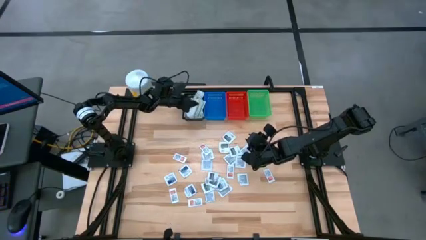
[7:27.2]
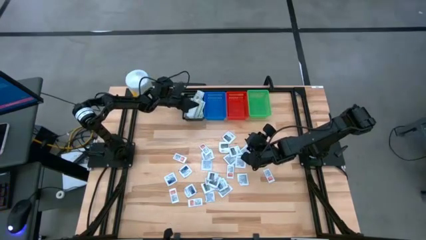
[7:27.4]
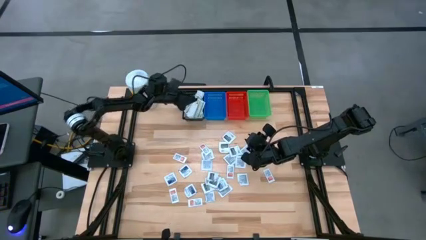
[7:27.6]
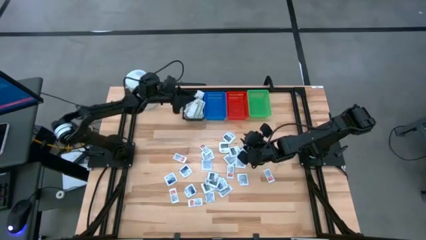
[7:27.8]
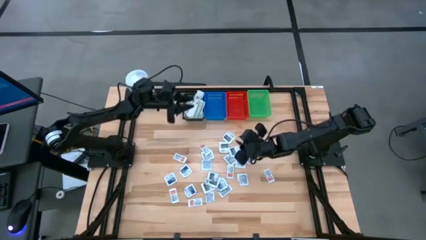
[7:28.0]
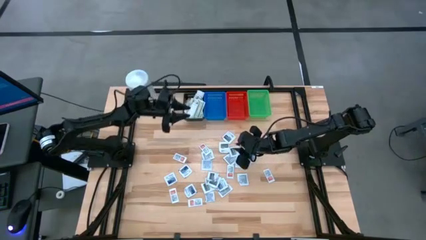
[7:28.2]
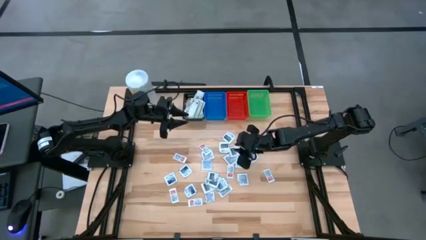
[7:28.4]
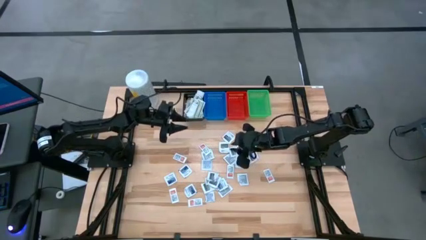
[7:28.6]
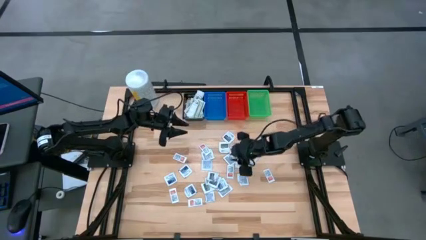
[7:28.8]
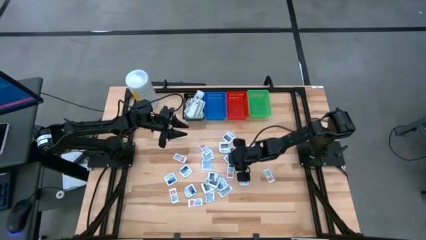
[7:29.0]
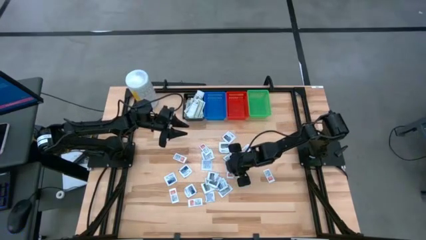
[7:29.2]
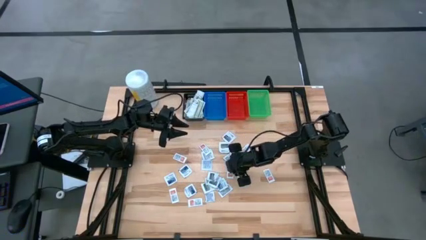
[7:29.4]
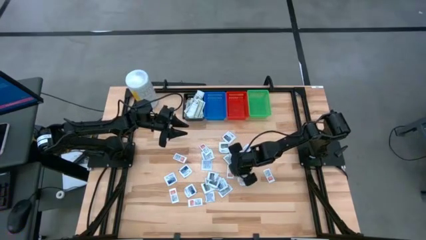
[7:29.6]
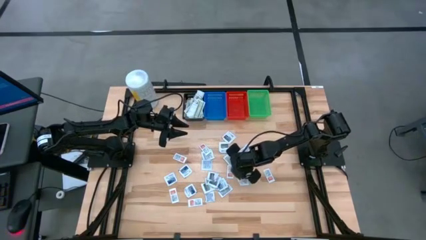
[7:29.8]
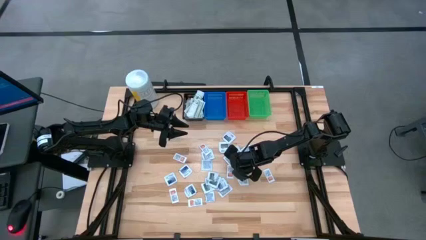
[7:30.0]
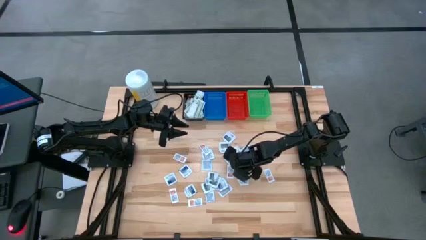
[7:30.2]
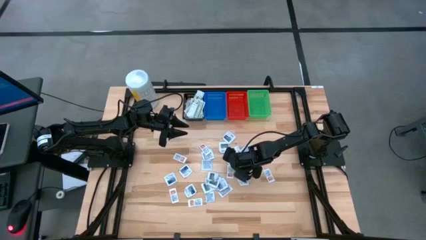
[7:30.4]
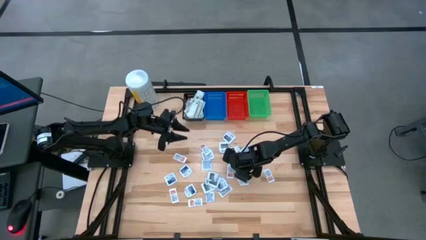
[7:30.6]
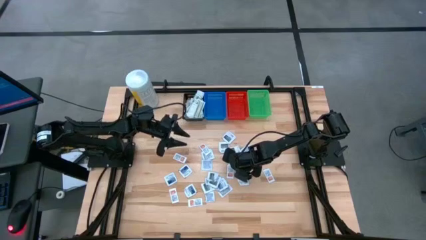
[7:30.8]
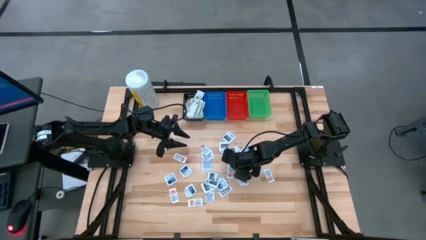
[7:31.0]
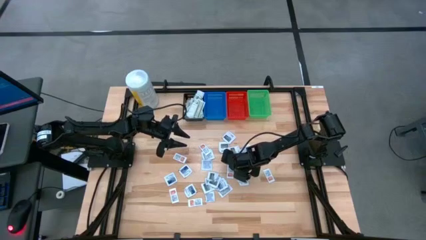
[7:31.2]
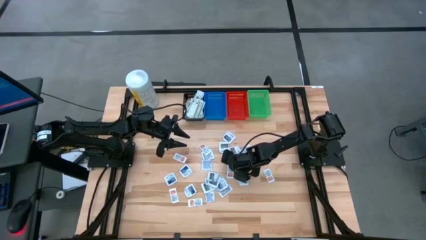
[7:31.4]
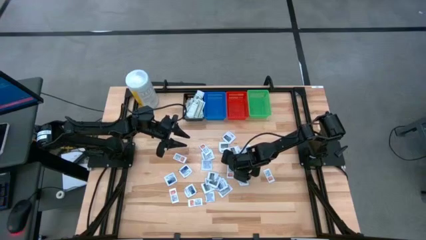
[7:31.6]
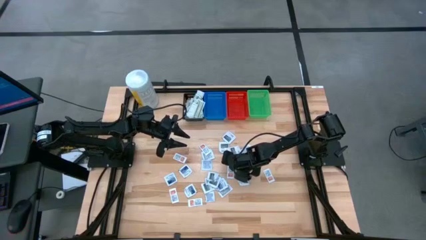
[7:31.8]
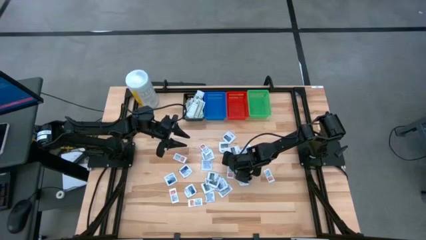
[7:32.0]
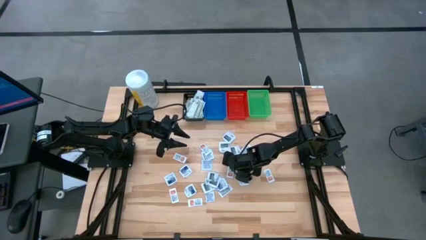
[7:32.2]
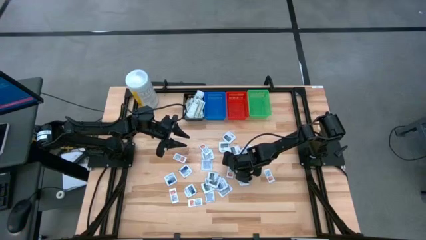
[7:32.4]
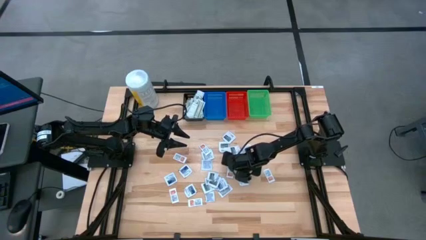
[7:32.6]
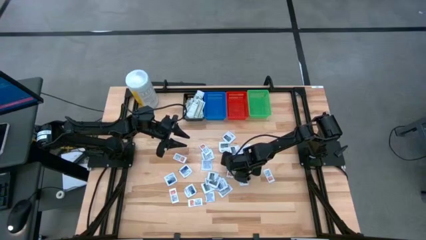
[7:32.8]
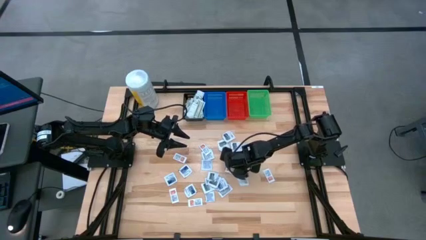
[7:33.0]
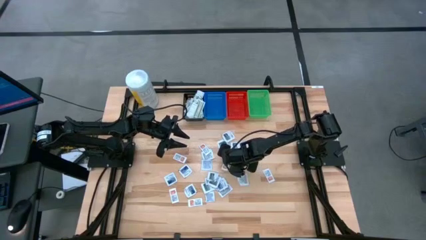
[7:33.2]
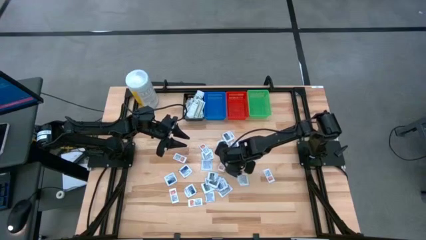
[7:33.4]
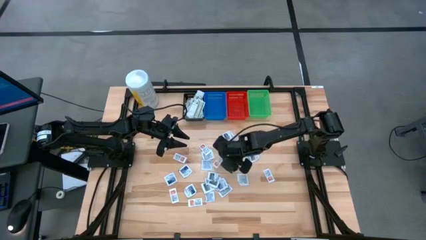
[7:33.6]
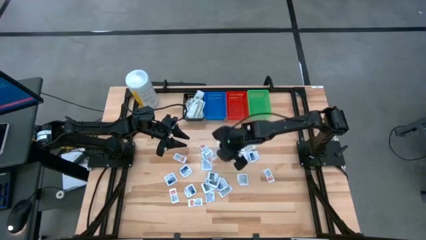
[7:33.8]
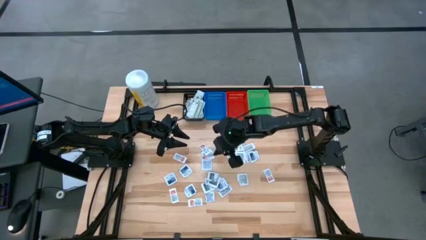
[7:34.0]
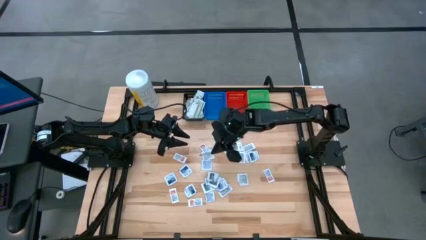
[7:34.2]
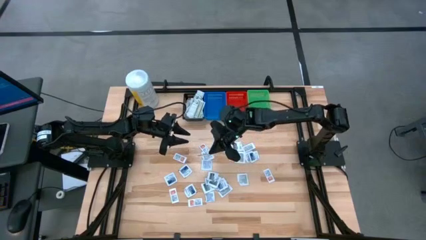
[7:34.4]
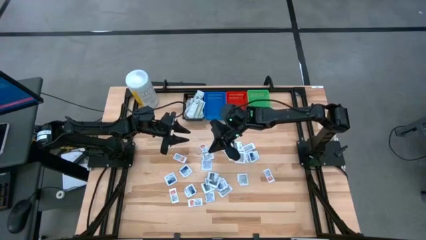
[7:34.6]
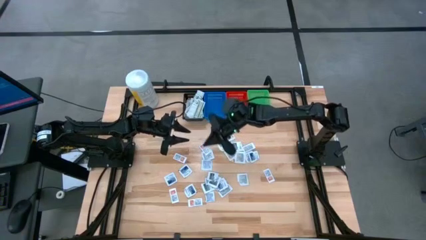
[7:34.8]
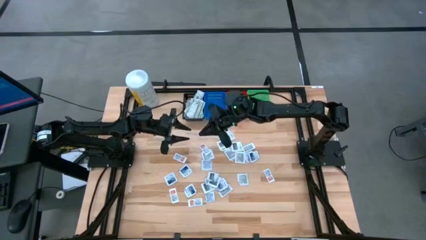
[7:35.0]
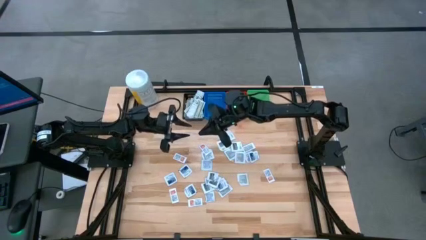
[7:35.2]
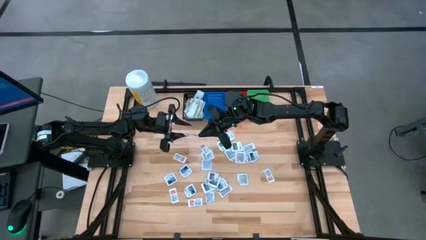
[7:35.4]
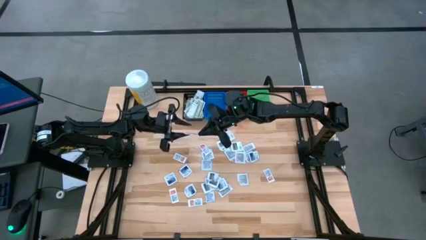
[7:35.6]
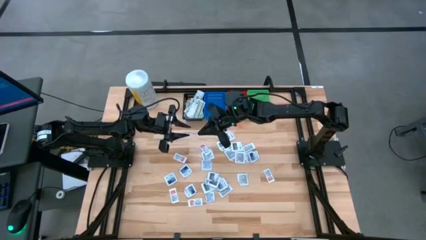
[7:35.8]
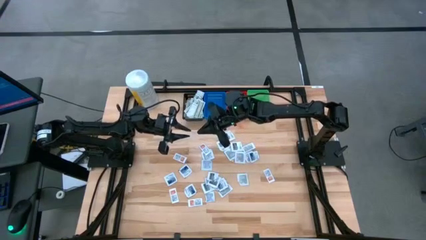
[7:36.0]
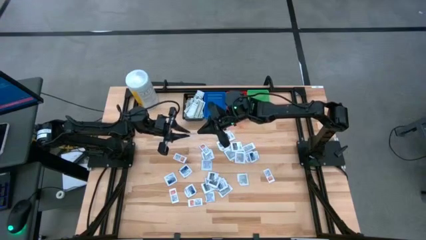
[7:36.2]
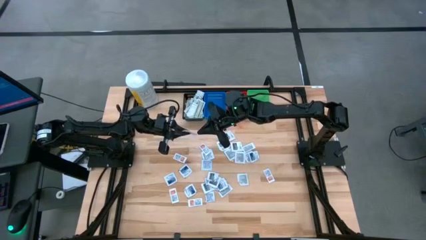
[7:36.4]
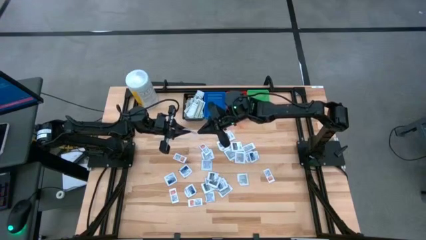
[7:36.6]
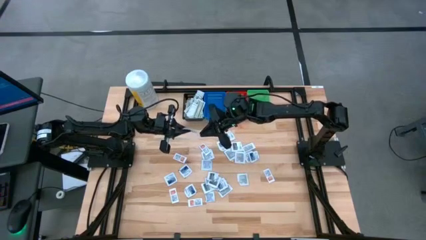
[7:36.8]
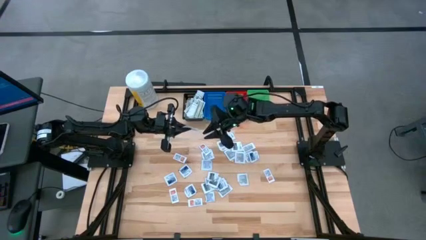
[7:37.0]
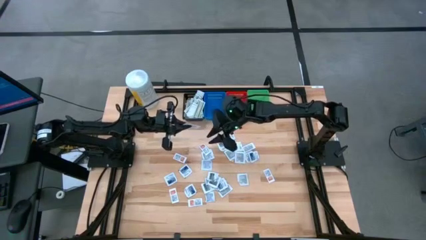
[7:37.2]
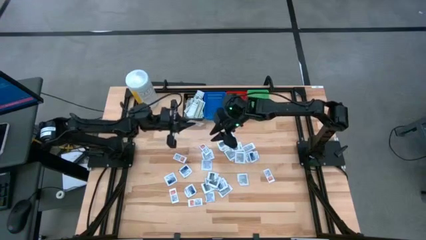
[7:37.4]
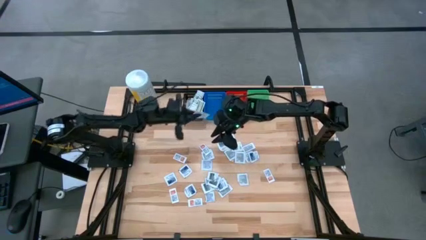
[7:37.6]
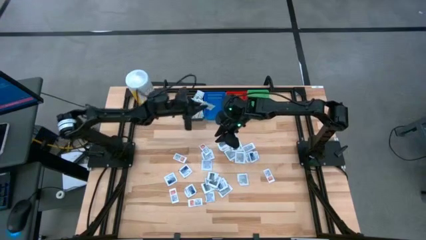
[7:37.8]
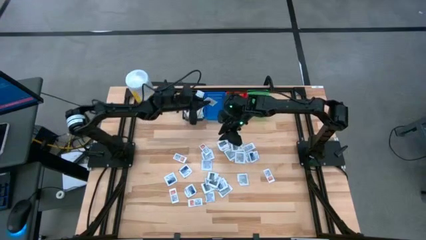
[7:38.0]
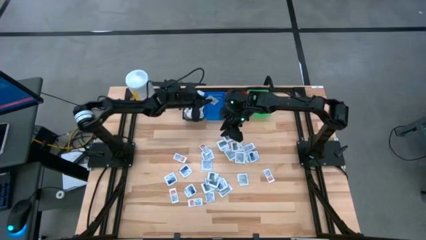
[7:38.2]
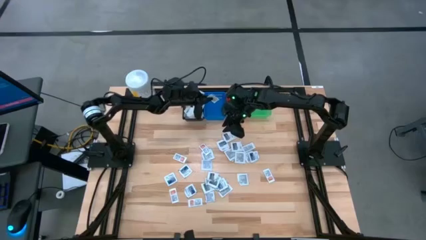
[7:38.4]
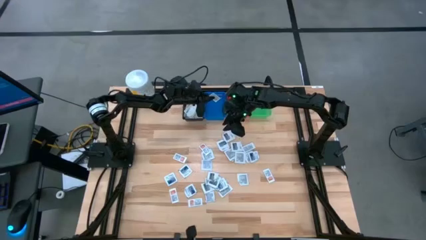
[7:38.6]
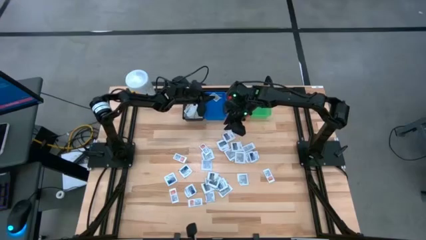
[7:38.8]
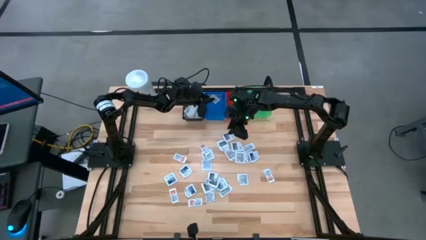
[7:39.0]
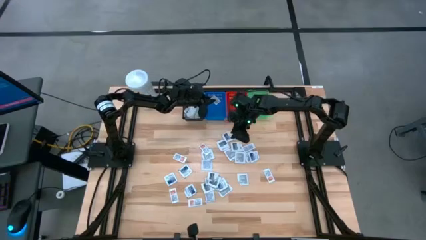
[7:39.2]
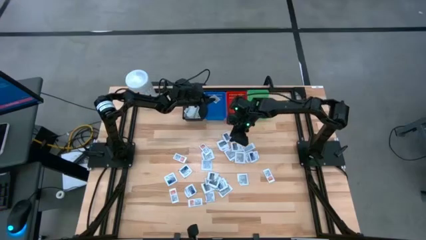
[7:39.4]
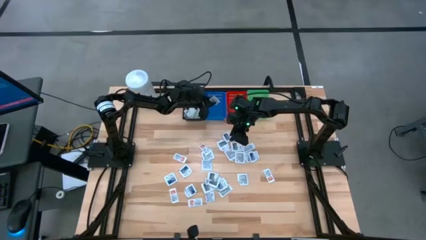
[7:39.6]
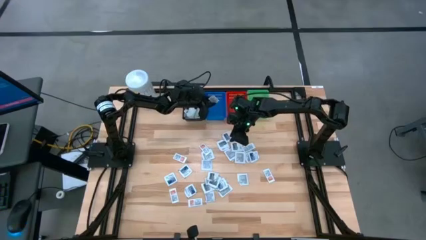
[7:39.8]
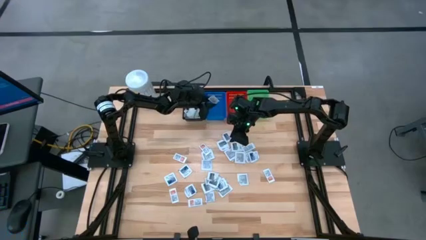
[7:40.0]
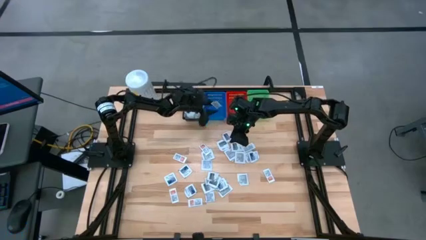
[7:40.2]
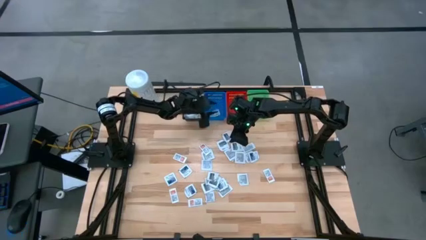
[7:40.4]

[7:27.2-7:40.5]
Task: Pick & Place First Aid Supplies
Put the orange ointment pack in the blue bin

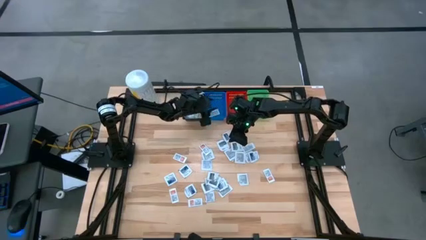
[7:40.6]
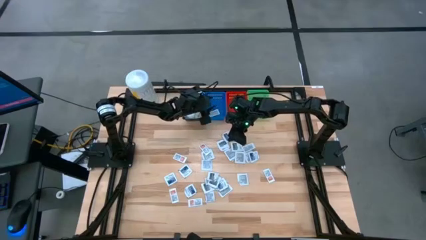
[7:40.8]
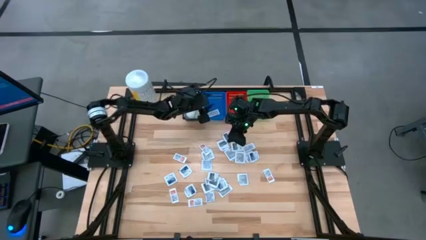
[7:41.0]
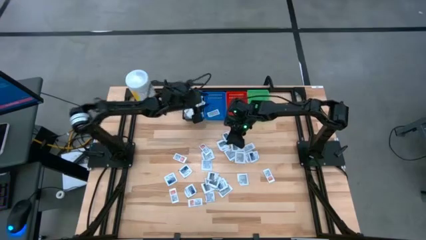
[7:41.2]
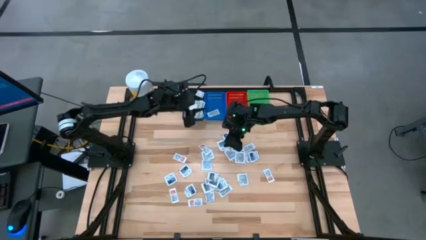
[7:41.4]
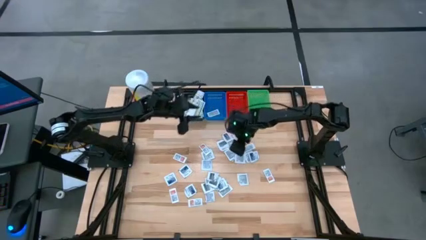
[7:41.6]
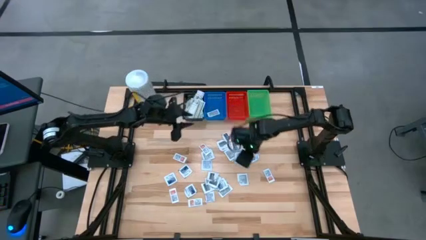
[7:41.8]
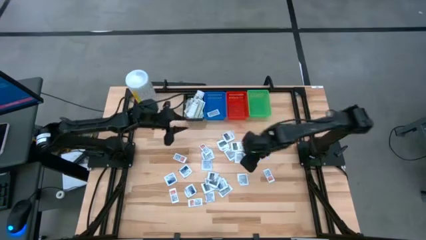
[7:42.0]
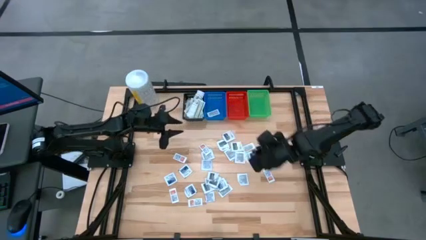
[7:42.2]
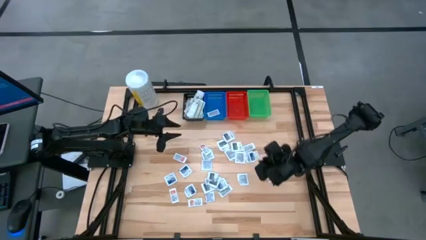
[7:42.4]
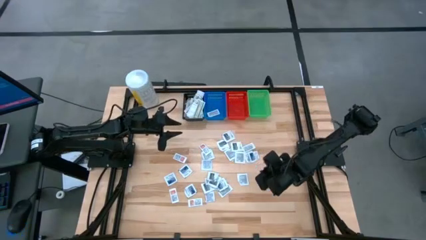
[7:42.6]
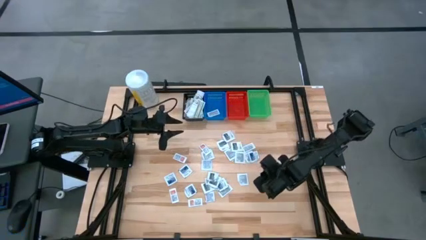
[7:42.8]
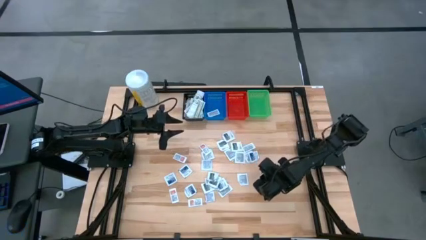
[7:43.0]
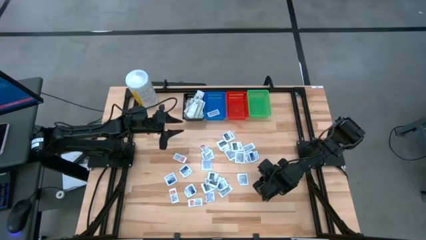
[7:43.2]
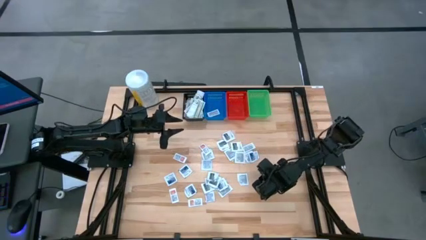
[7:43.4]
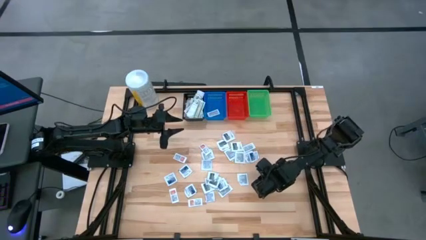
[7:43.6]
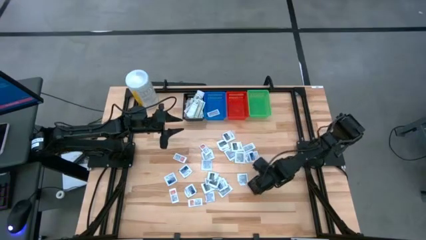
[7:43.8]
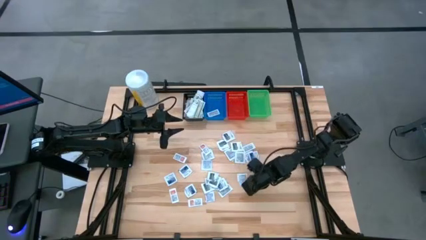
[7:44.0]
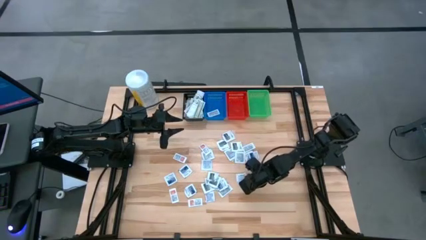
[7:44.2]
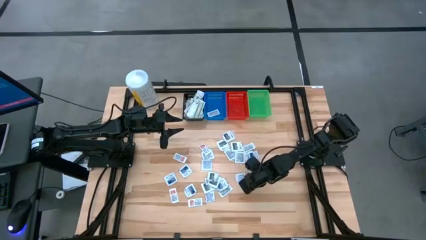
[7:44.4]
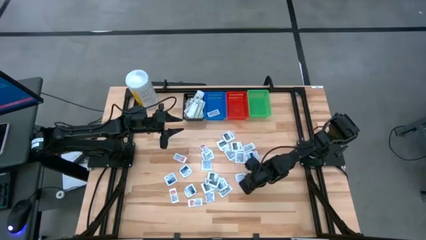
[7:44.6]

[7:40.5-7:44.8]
Put the orange ointment pack in the blue bin
